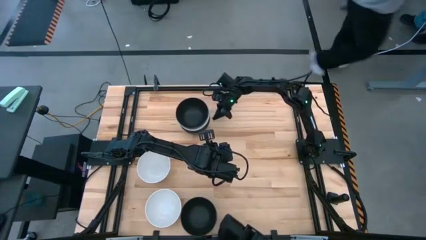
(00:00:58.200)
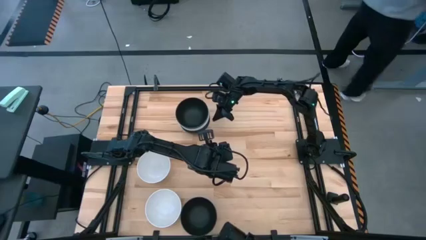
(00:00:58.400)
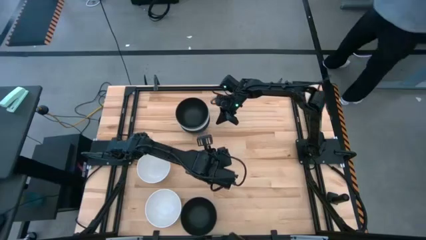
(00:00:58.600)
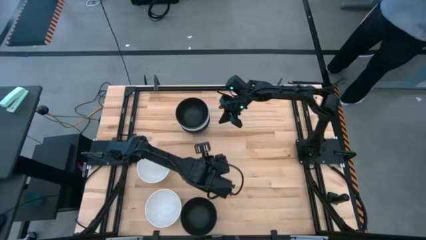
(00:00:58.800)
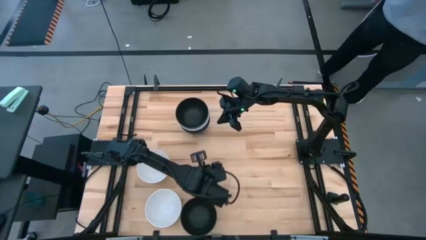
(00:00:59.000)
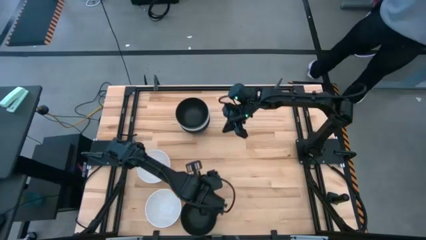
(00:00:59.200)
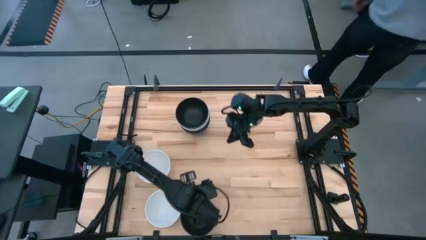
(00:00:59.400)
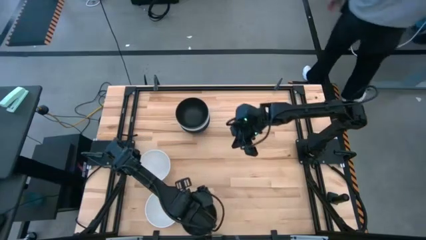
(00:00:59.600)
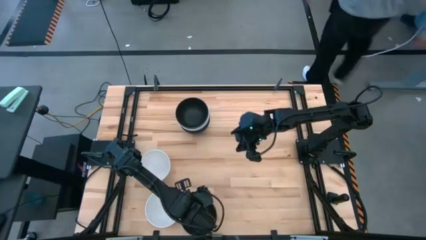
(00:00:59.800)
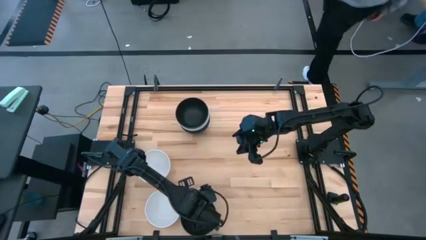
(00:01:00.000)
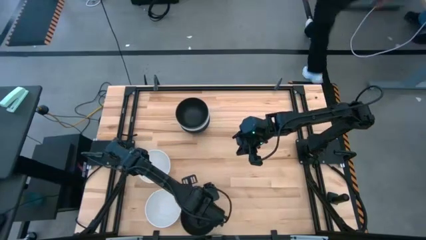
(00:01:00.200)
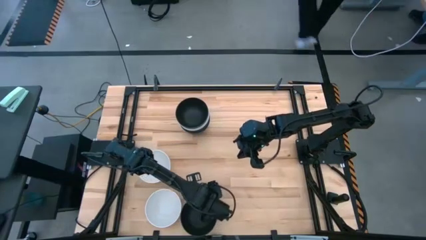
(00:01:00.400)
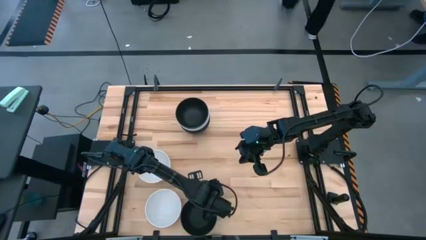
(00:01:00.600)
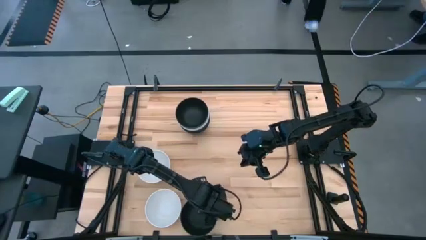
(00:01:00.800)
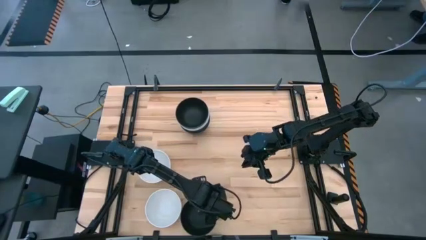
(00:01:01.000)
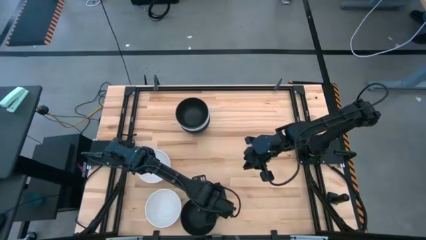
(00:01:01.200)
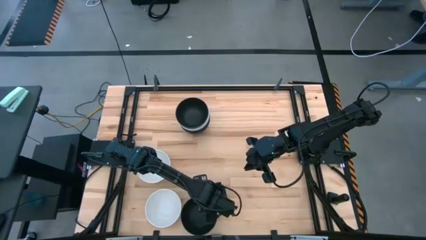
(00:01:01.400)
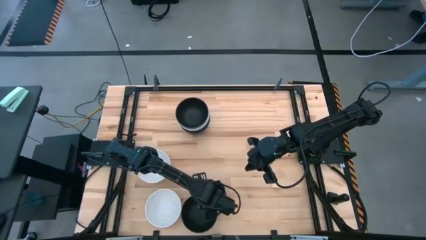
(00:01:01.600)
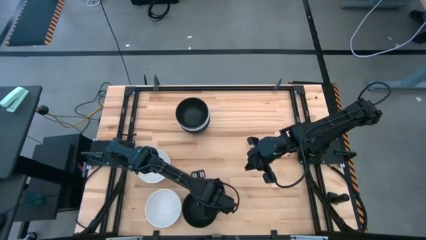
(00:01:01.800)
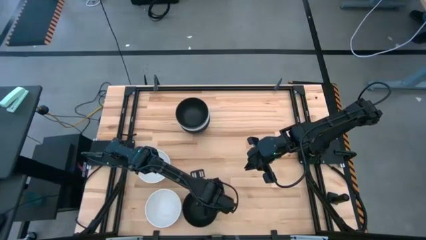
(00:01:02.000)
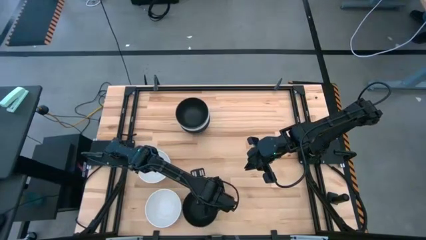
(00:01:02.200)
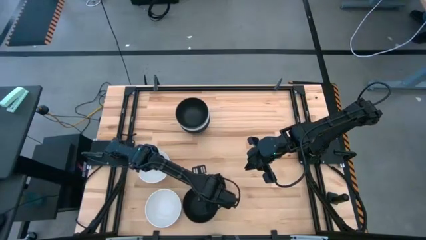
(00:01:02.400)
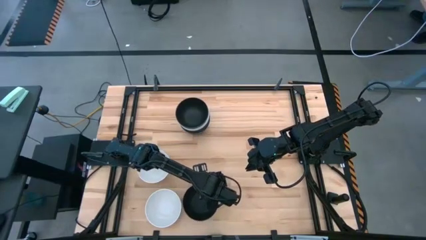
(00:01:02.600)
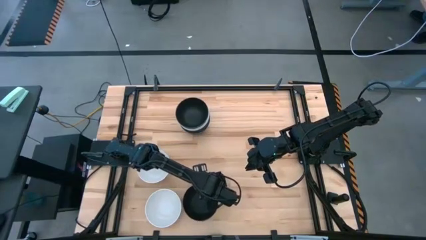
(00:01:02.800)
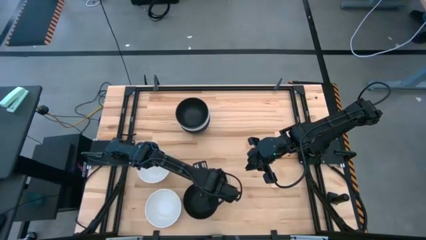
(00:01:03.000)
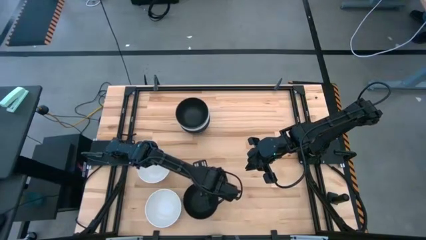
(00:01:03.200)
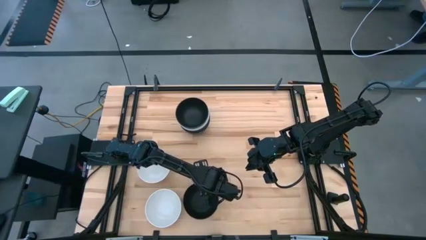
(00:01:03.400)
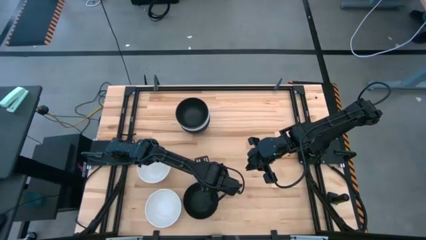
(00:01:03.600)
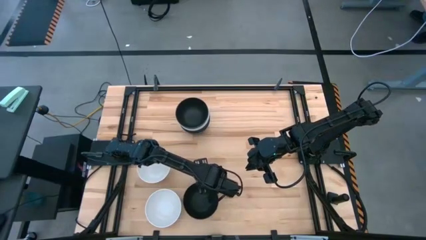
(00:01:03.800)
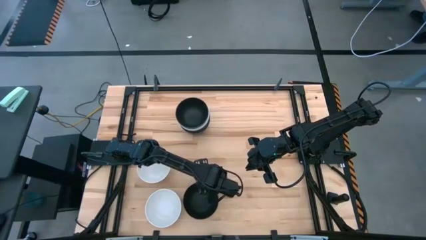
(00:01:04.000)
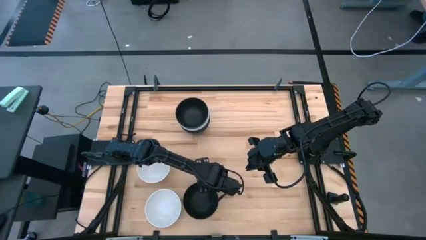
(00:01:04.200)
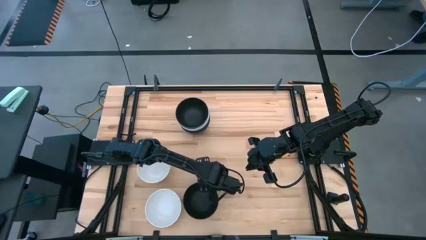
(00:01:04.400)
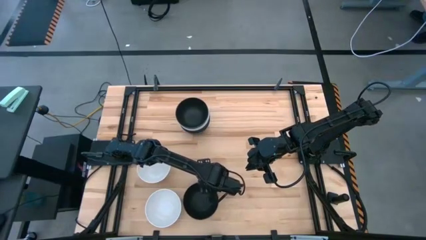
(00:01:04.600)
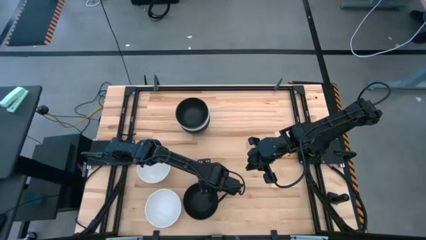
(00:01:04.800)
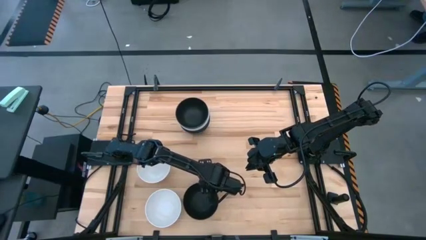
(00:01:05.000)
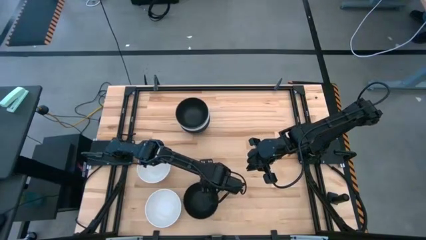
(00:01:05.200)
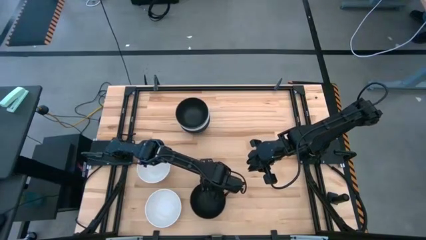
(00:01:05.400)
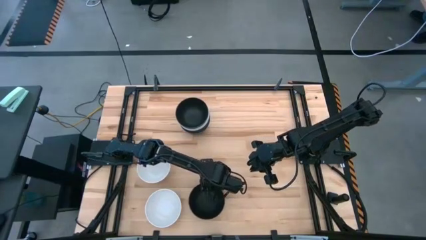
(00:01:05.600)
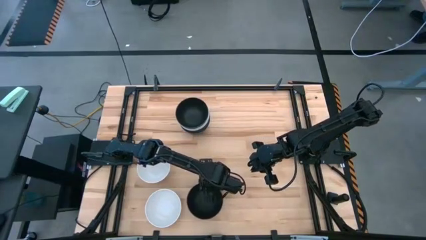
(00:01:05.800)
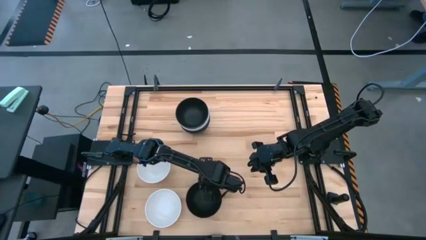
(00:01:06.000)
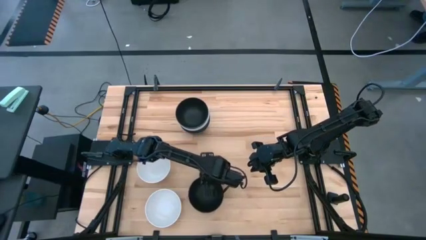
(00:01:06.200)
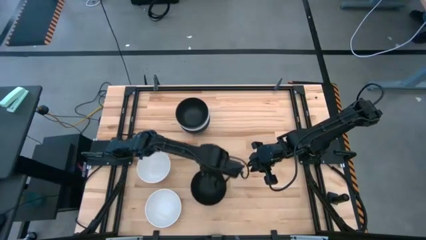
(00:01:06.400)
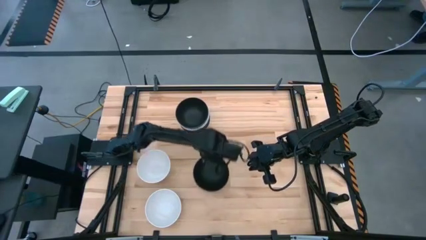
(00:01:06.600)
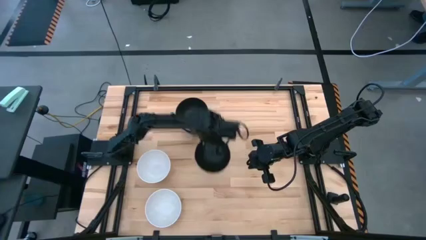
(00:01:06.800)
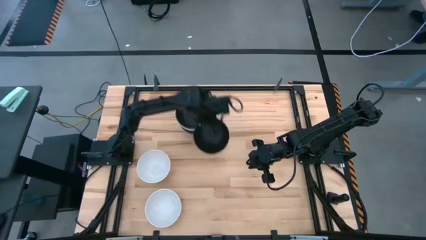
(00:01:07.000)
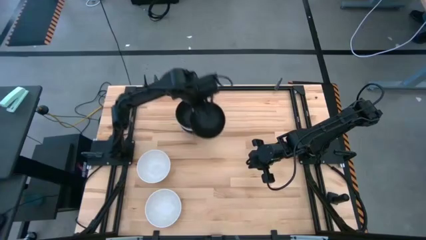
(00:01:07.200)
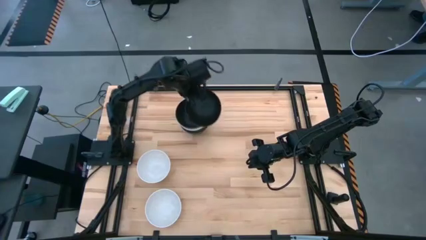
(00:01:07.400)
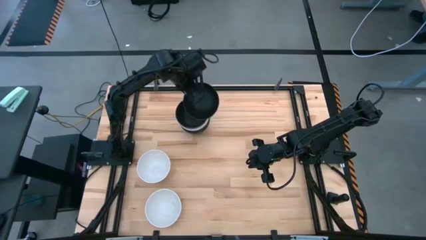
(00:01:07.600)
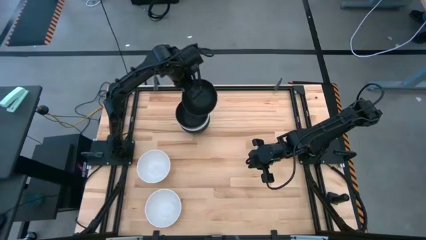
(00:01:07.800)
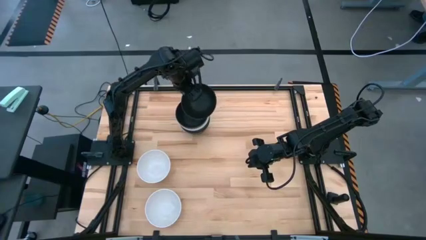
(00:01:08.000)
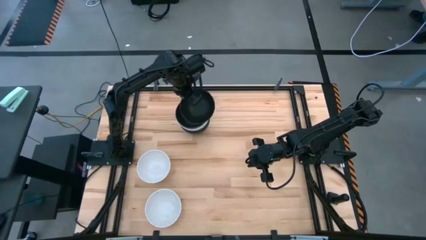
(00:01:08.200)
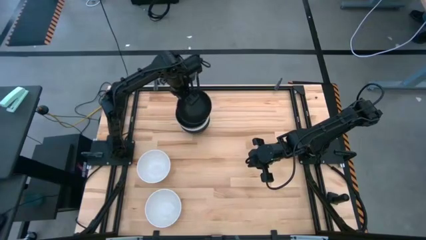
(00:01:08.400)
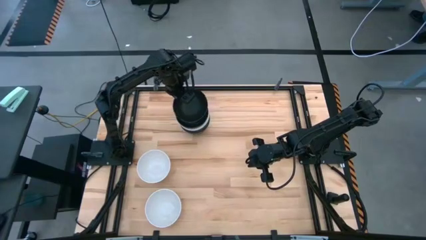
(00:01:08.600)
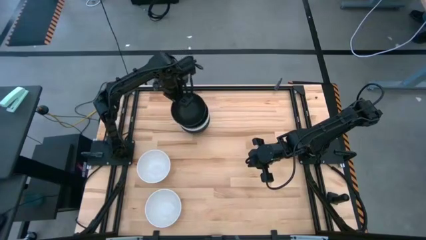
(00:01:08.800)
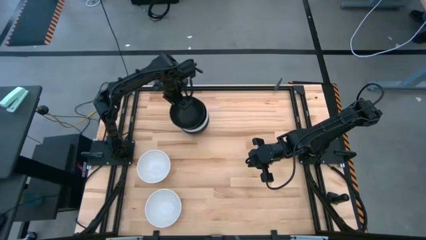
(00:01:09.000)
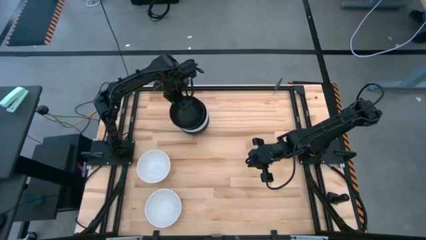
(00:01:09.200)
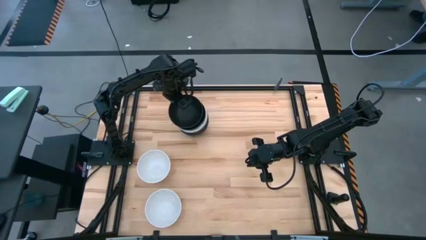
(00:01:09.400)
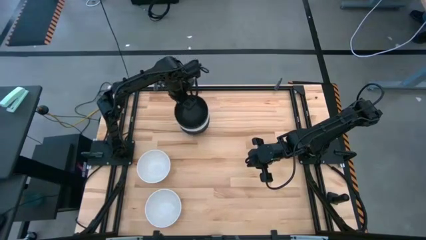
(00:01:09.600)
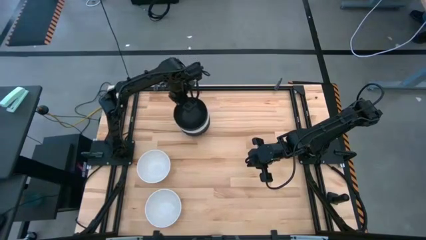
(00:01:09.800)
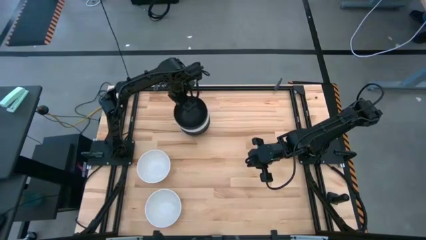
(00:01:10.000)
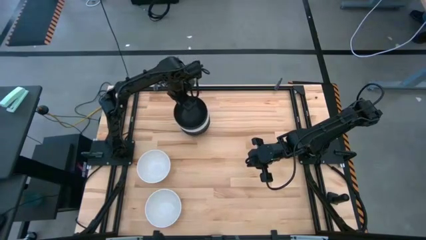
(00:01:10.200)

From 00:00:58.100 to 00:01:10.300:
Task: Nest bowls inside each other
Stack the black bowl on top of the stacked black bowls

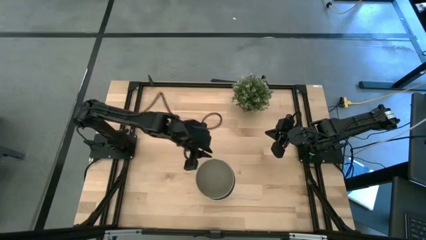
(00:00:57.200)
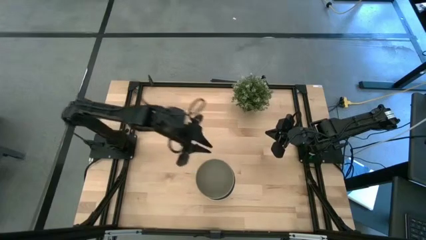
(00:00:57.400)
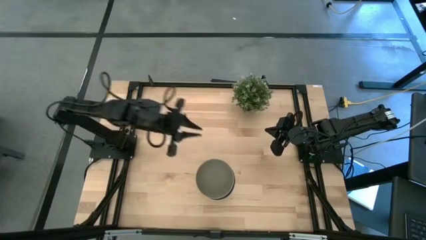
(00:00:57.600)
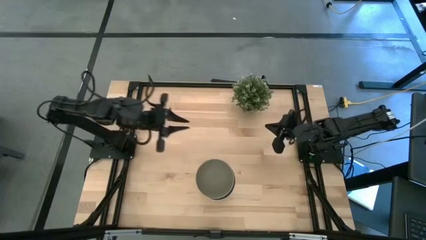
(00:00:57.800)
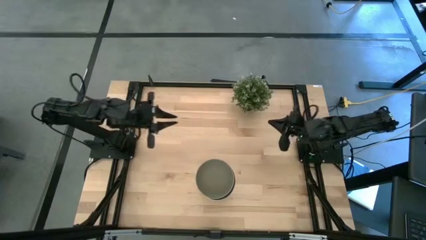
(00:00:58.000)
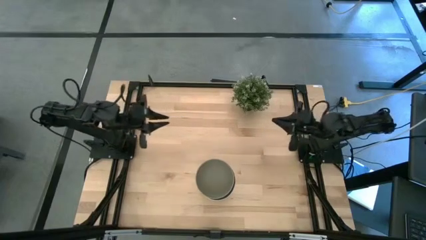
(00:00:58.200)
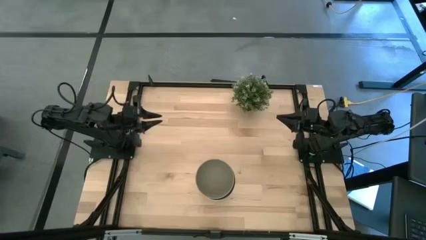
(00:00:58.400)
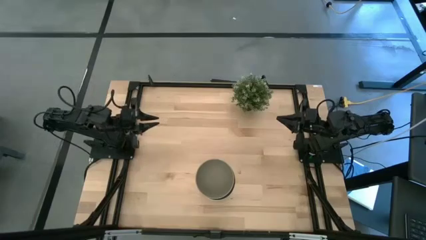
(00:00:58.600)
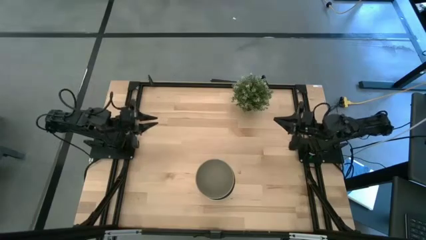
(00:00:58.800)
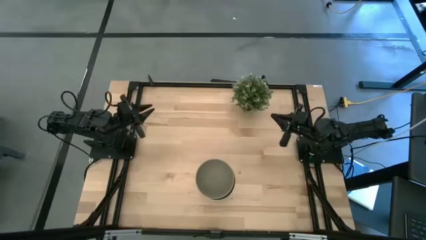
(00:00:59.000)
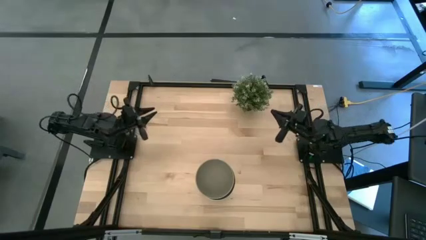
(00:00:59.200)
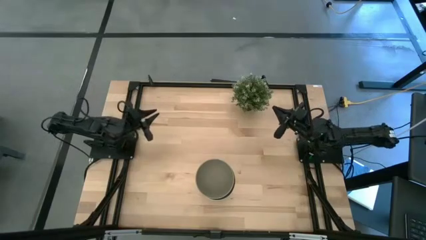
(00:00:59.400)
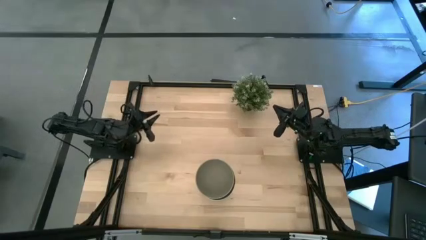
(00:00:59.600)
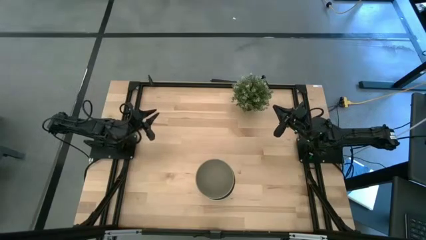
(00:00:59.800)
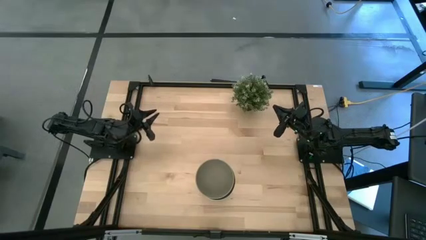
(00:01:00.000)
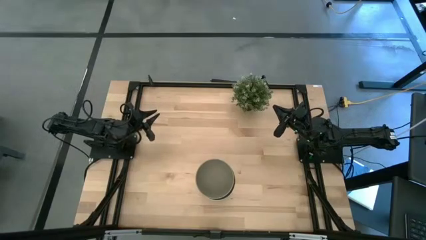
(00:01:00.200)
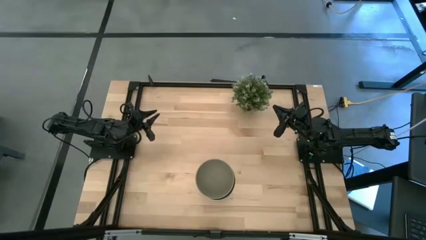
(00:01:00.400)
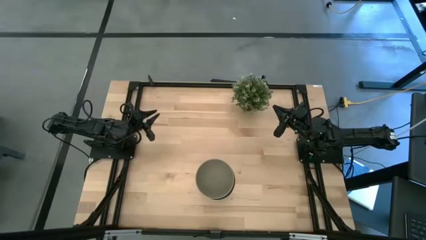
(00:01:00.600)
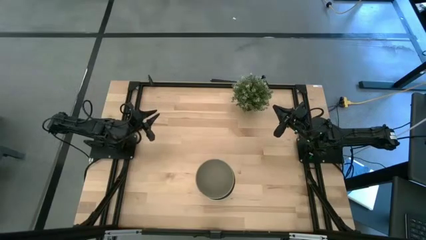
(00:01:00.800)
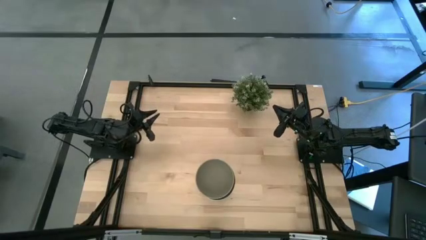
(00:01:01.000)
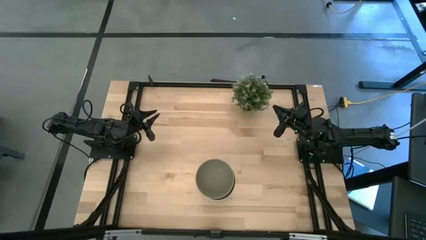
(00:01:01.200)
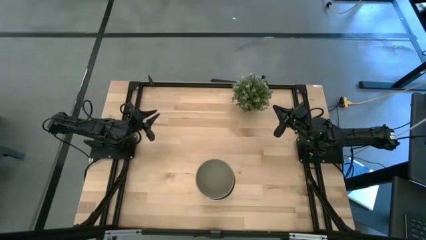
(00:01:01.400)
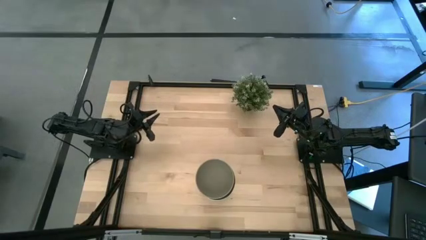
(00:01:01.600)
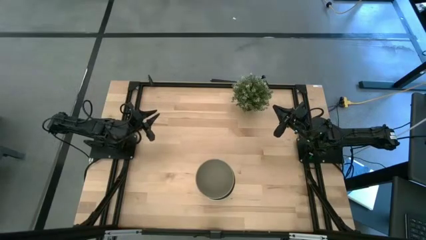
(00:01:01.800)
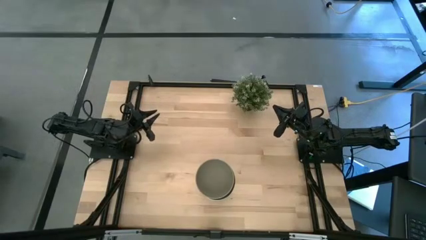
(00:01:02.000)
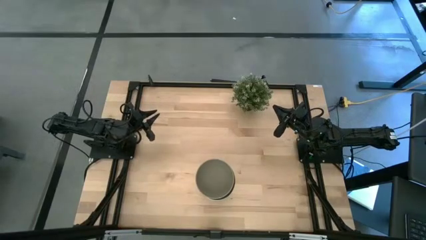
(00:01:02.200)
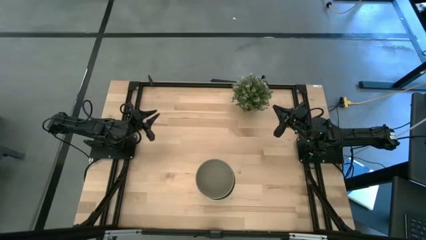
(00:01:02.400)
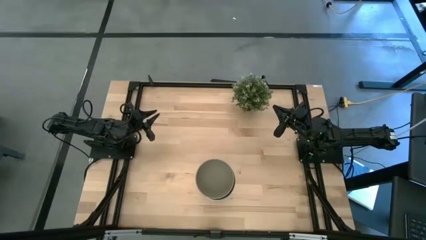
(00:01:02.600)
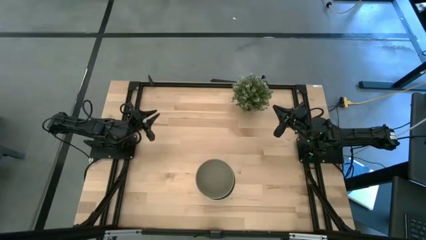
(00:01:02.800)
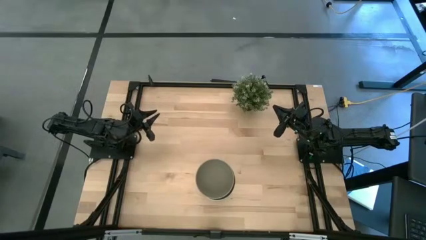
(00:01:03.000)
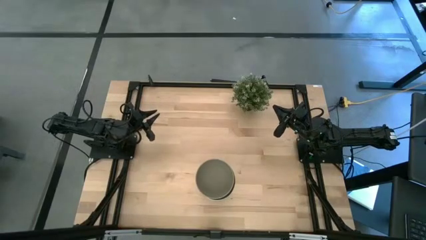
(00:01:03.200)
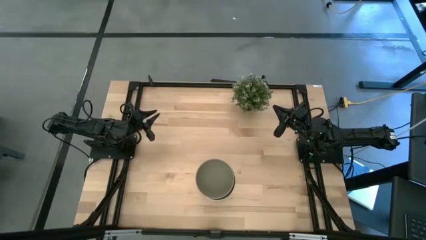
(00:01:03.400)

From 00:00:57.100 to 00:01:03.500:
Task: Nest bowls inside each other
Return to Home Position
